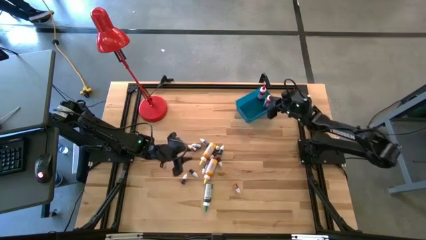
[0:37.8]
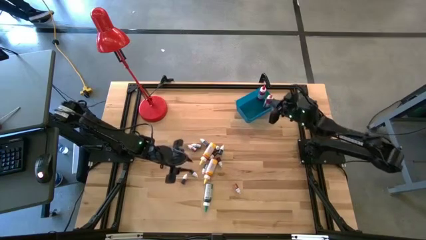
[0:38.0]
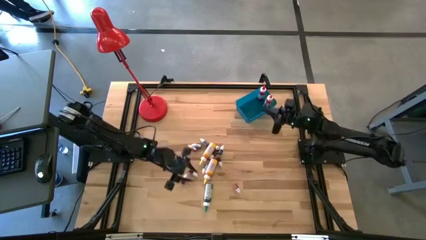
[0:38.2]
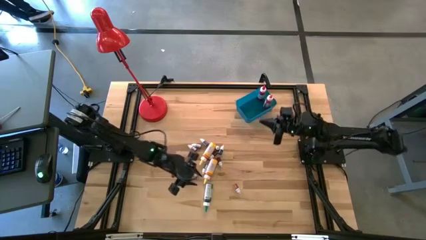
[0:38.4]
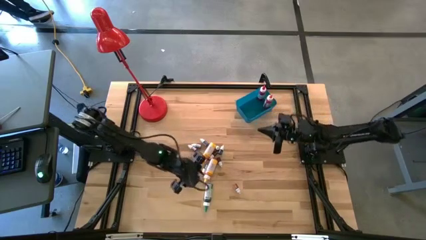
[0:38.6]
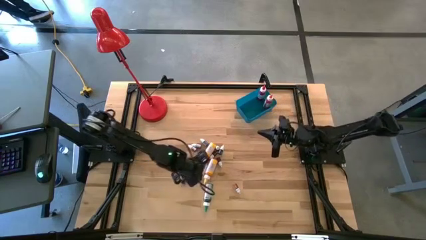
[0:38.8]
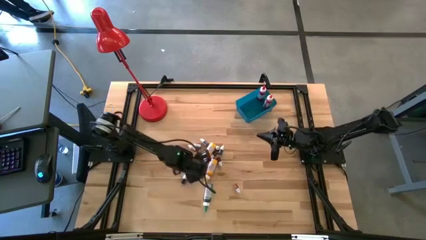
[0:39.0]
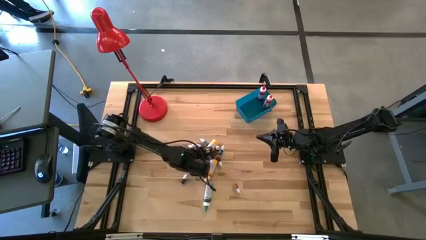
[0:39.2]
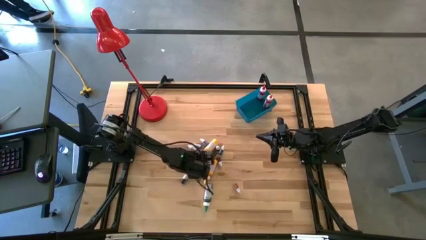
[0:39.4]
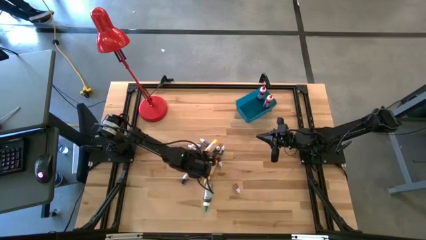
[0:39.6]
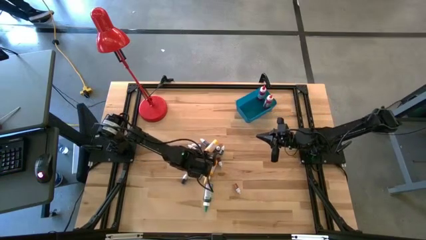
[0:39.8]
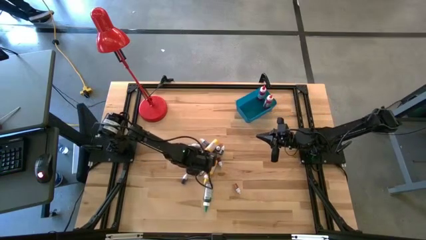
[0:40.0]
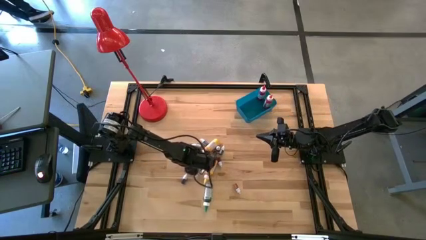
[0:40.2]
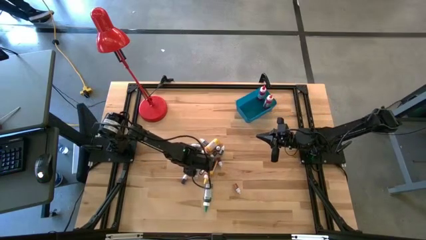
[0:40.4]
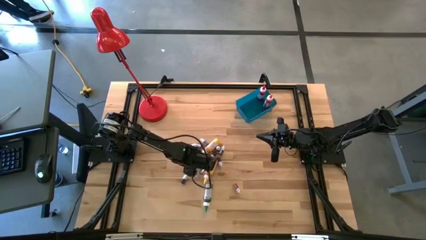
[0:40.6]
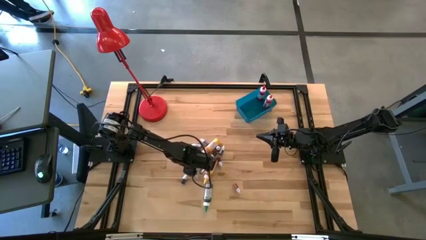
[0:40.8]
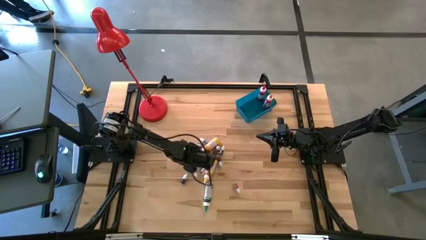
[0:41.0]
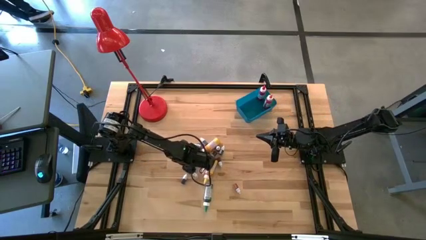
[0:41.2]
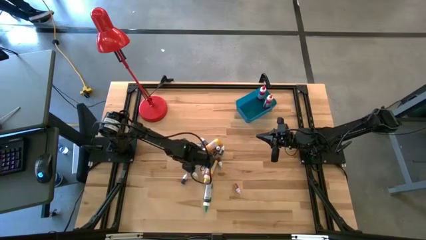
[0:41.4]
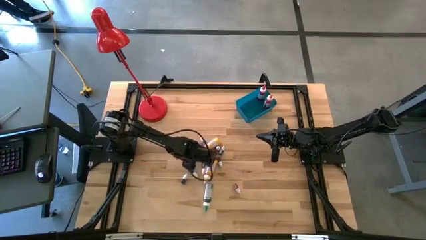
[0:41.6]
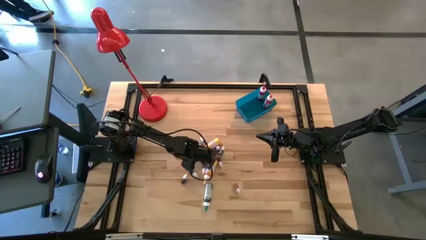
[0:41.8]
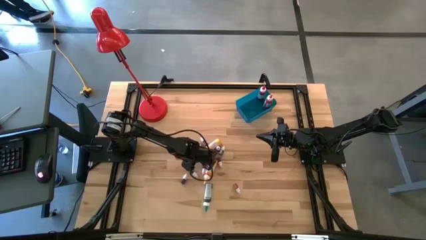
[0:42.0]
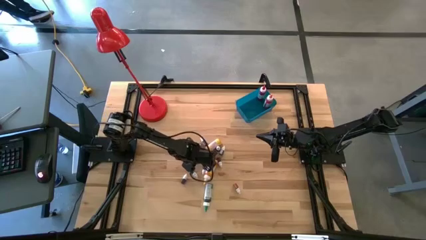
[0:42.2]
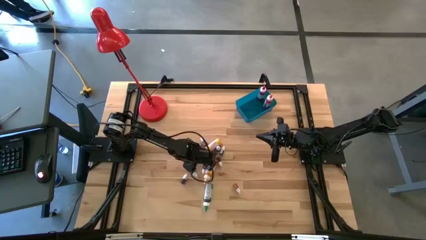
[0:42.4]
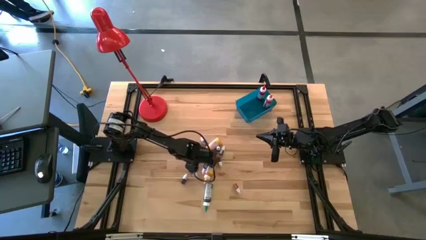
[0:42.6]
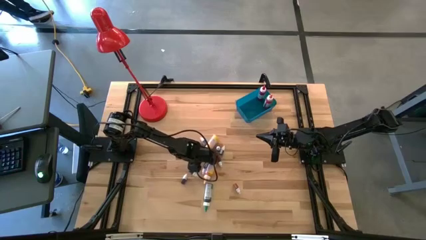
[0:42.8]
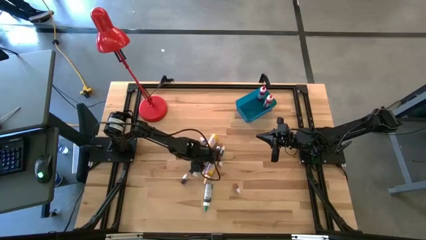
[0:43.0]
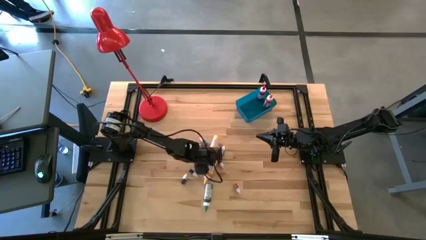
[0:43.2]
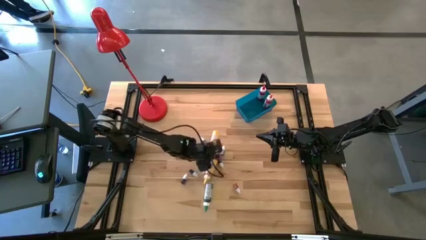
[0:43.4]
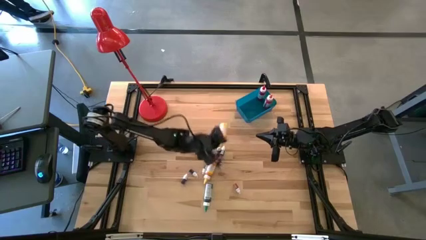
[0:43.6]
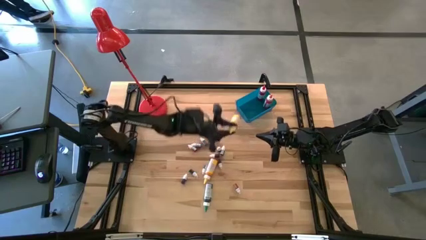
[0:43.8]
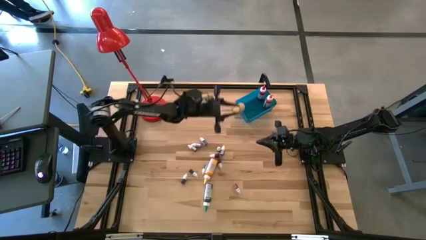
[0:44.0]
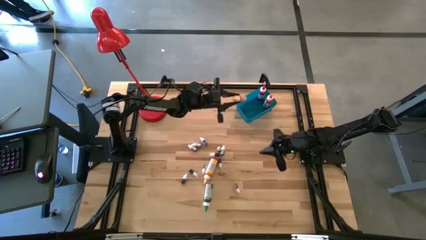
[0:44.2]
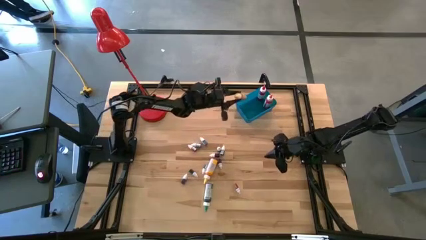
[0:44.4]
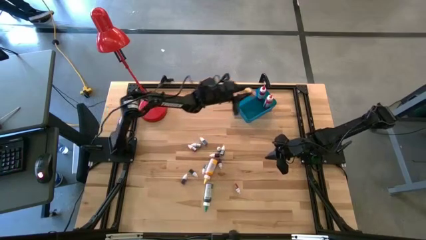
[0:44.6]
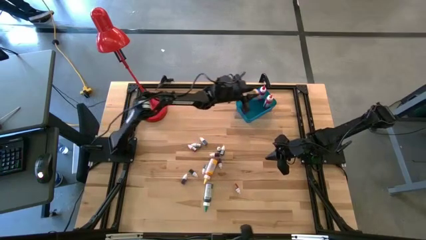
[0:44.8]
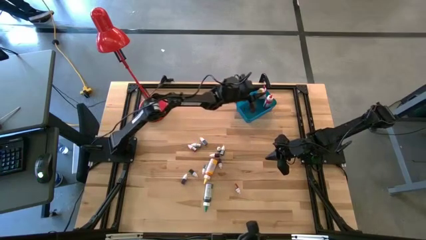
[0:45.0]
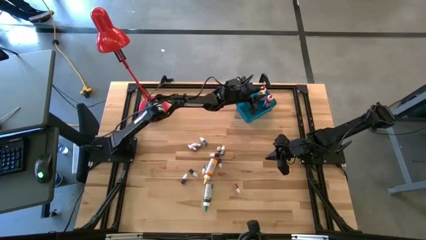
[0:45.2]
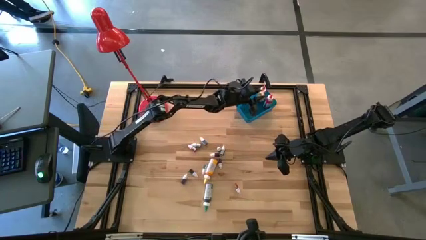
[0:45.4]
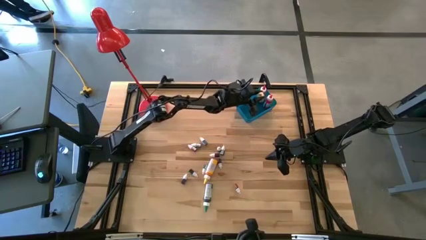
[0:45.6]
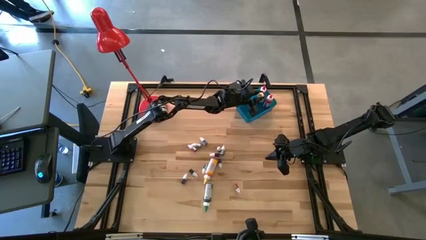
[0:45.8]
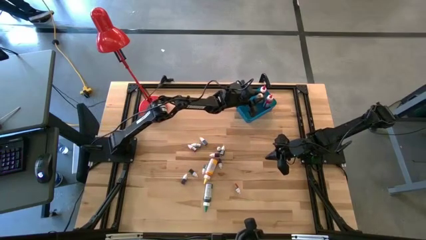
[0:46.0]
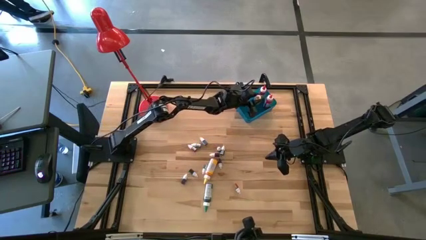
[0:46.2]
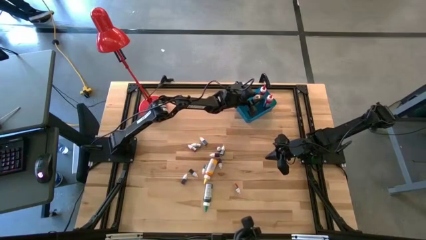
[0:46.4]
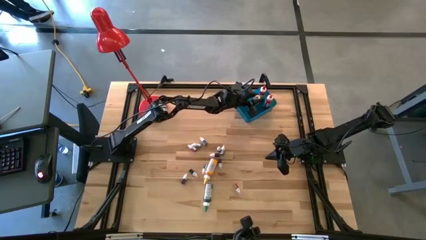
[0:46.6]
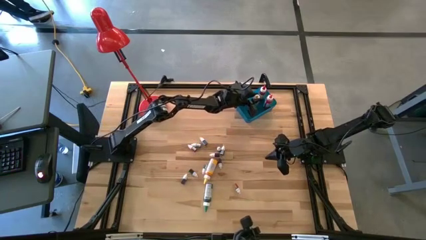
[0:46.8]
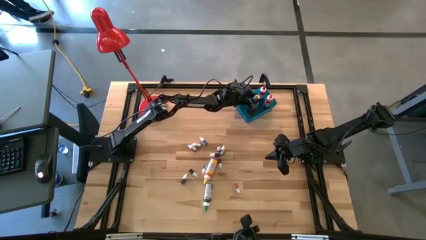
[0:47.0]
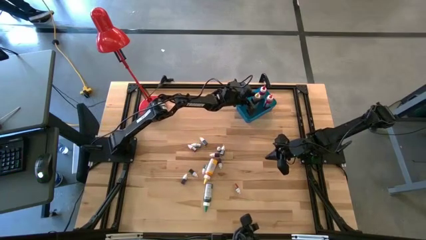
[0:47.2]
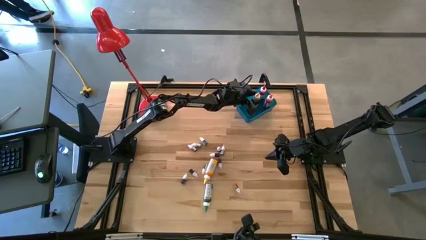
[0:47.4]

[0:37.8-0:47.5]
Task: Pick & Place food coloring
Put the top yellow food coloring bottle into the blue bin

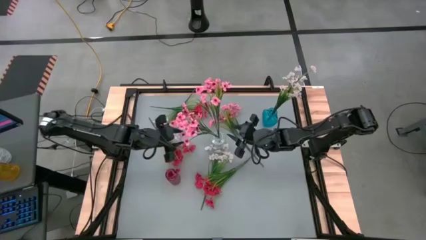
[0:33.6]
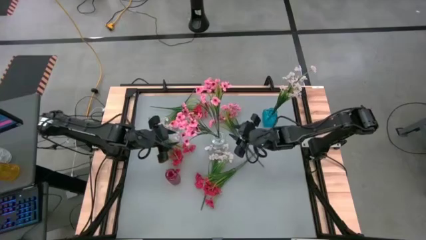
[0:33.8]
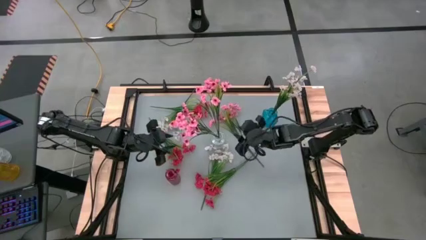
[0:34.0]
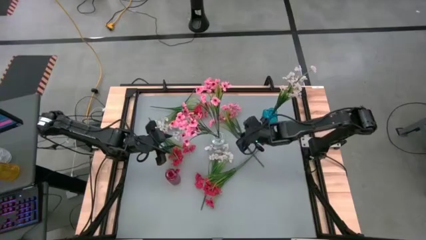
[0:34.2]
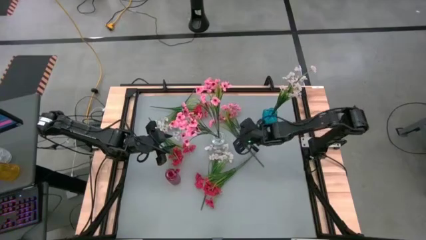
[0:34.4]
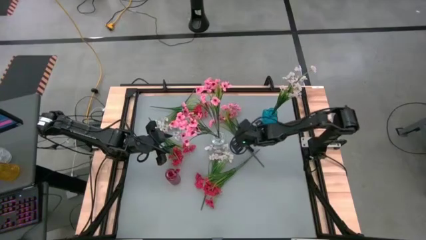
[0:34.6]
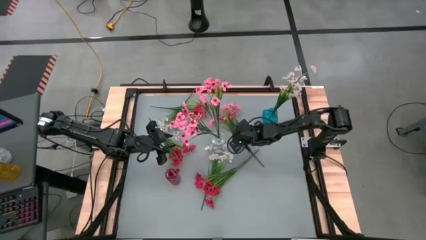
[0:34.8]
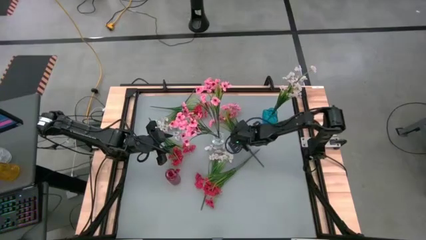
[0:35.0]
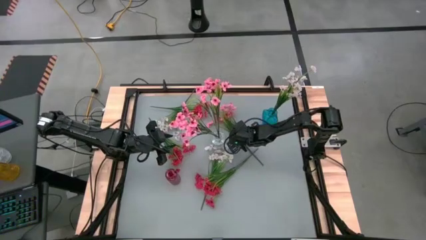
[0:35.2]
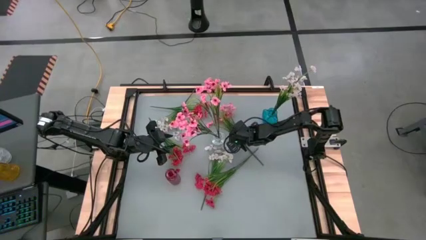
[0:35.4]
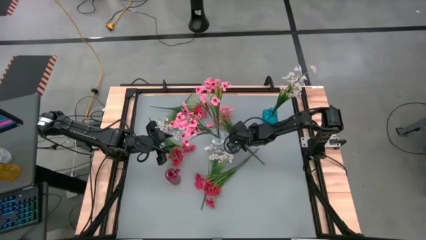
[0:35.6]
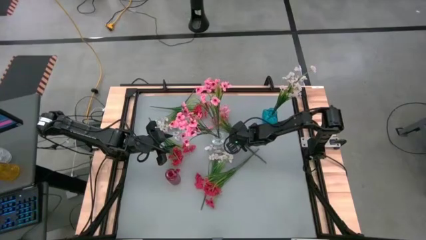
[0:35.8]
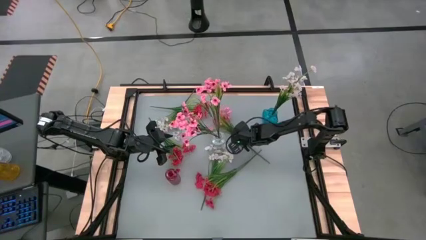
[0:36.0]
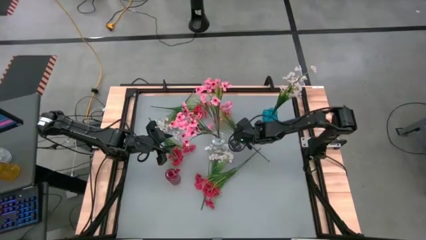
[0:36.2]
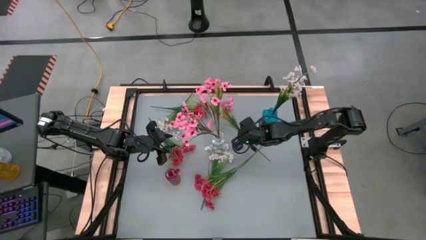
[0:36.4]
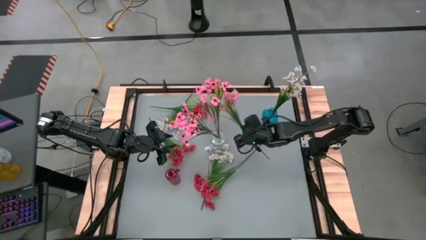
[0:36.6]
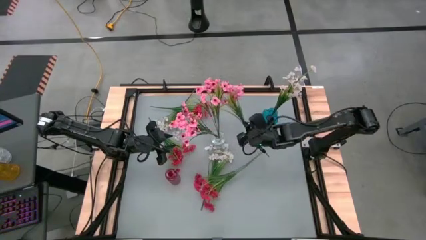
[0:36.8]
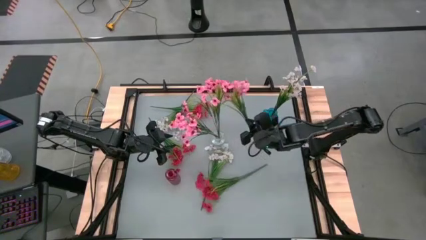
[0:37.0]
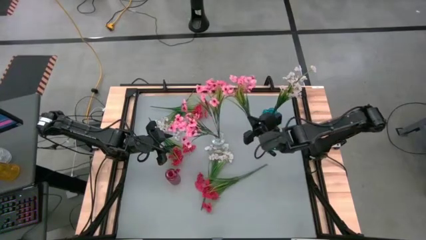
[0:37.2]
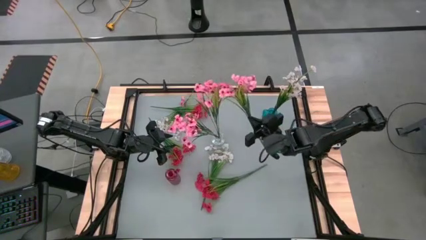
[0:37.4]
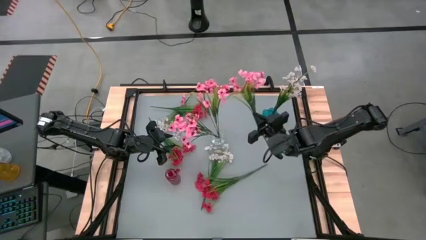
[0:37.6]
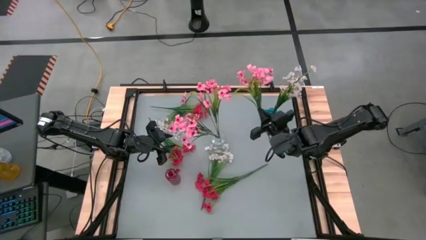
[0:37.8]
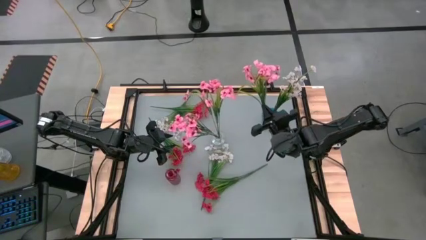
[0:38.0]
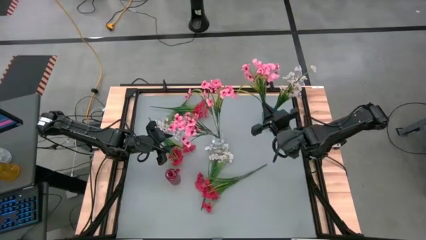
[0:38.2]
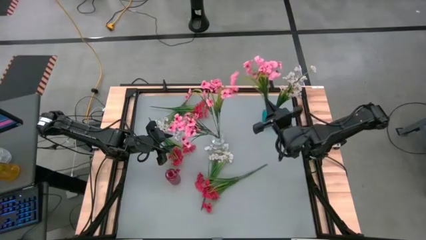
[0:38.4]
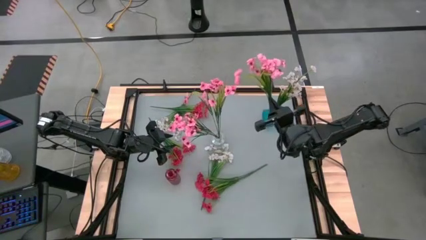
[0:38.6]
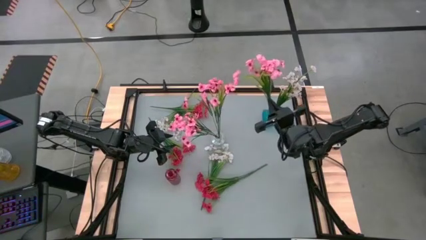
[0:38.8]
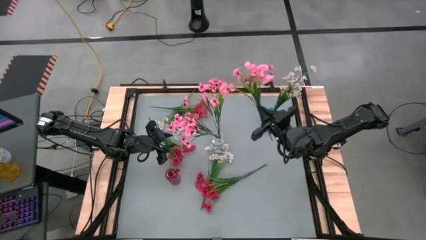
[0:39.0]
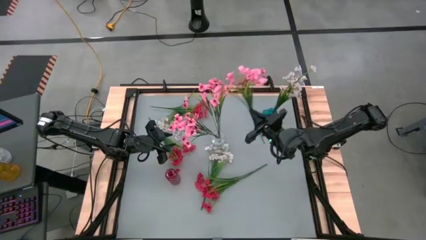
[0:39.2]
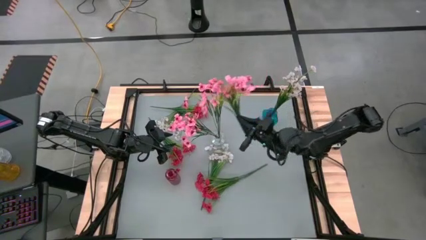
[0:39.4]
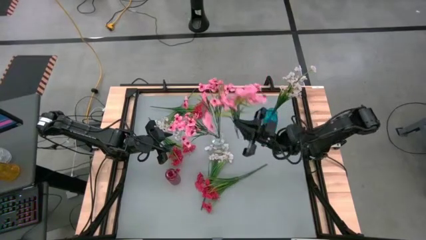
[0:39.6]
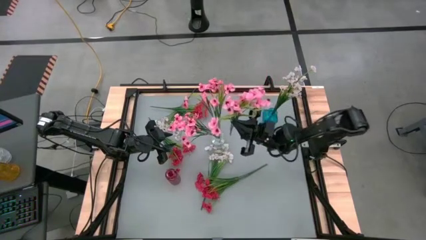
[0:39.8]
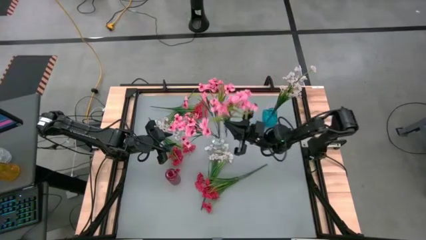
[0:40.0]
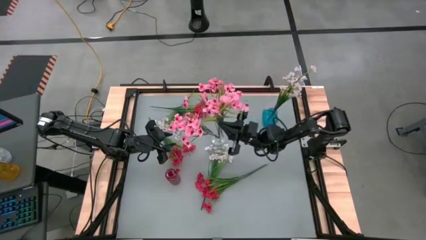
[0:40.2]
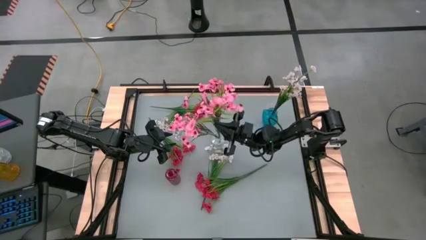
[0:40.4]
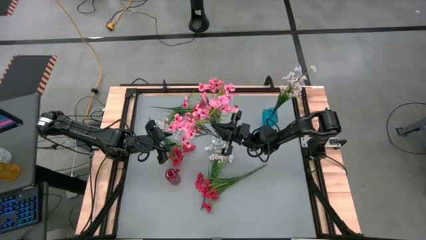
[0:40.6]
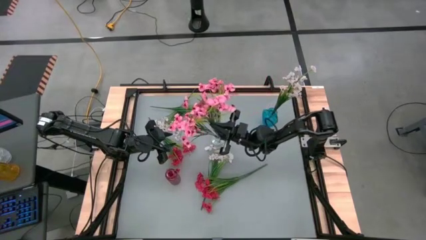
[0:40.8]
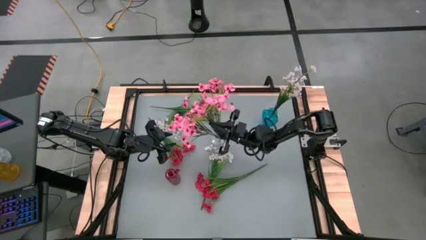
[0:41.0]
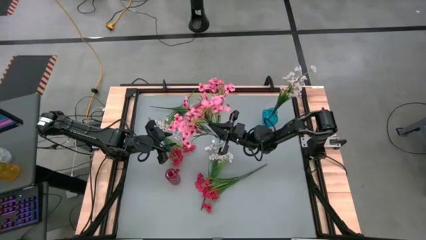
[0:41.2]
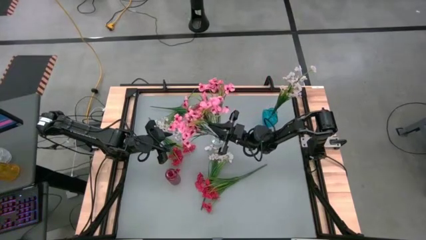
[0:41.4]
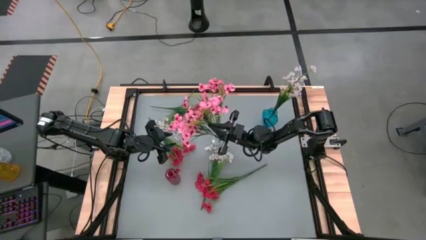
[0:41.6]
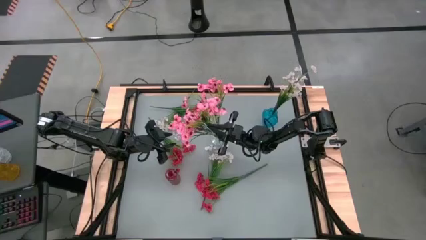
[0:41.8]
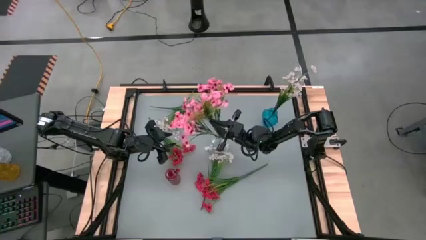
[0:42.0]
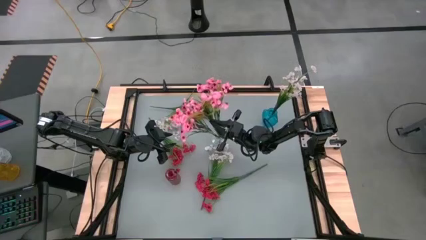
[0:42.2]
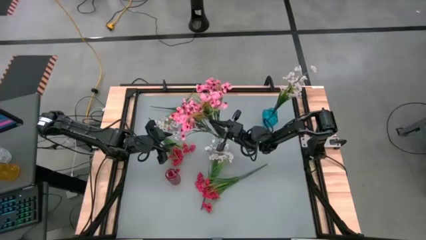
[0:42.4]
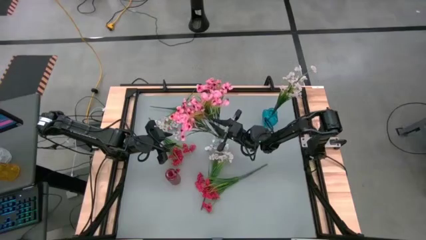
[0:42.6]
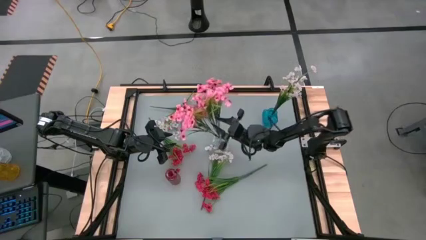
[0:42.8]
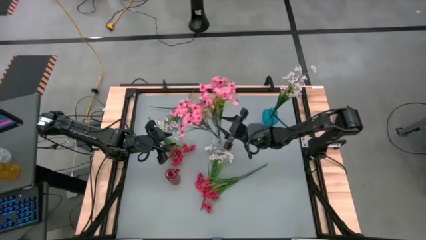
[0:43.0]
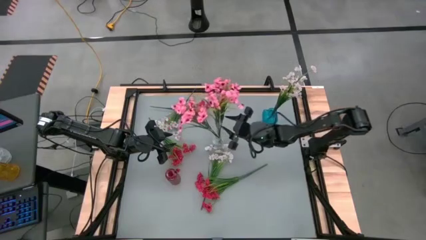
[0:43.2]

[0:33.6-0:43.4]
Task: Sort flowers into vase by color
Put the pink flowers into the transparent vase
